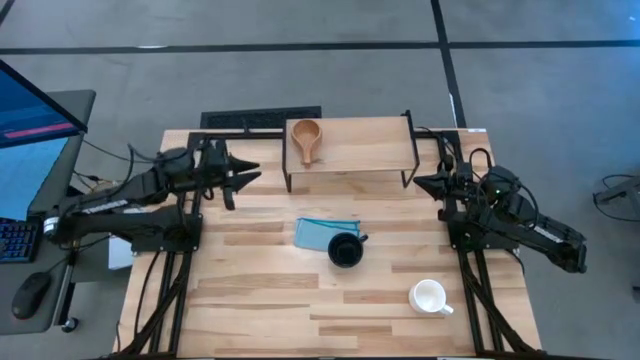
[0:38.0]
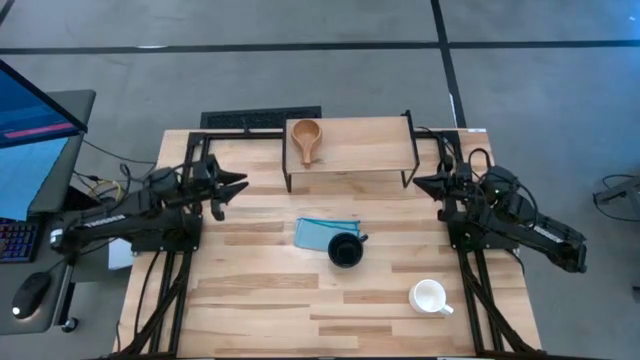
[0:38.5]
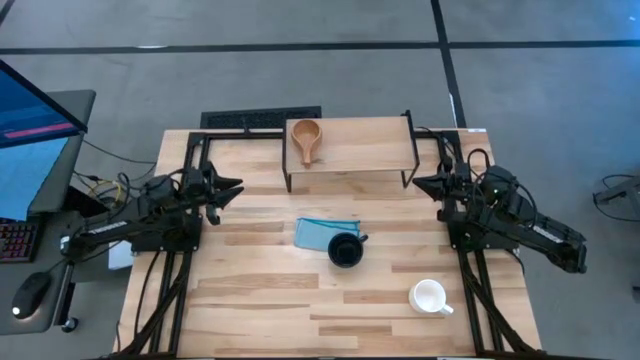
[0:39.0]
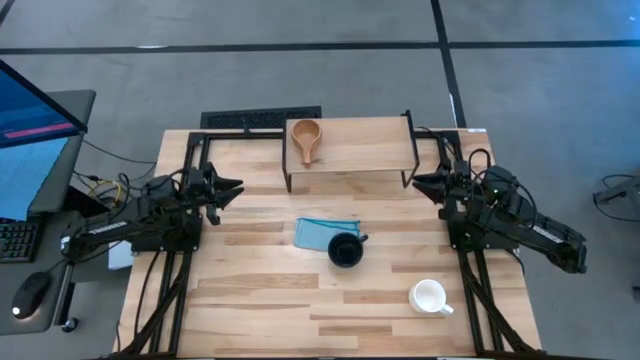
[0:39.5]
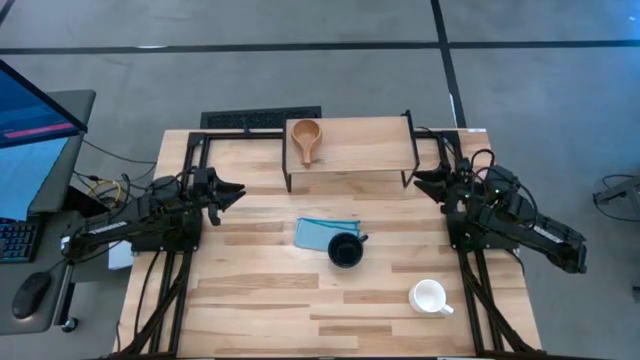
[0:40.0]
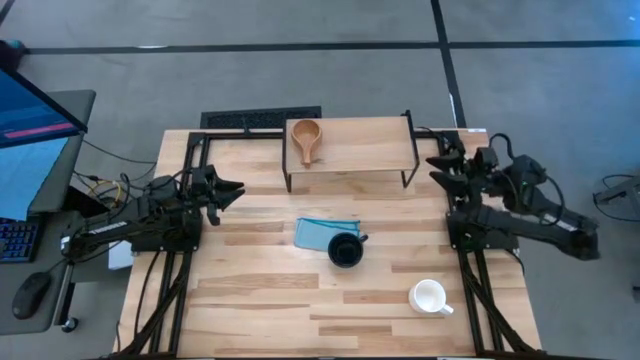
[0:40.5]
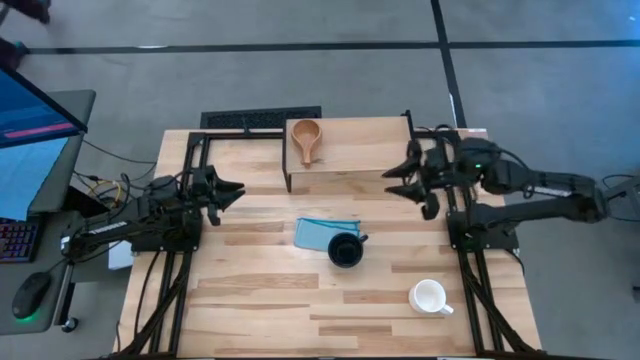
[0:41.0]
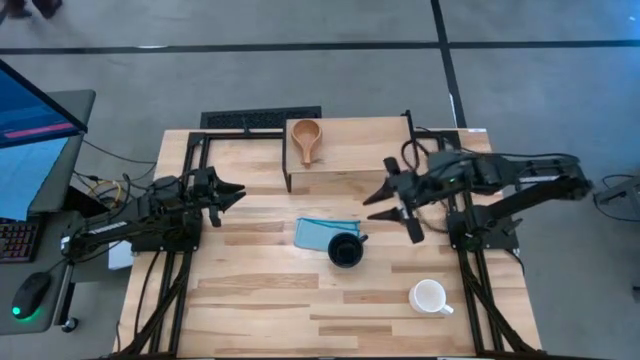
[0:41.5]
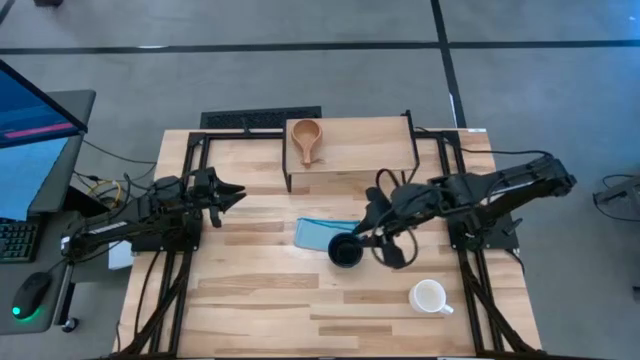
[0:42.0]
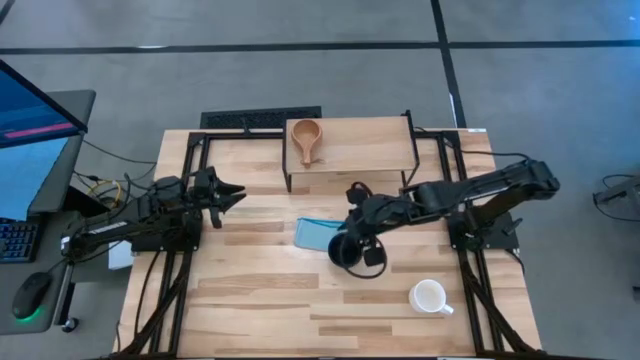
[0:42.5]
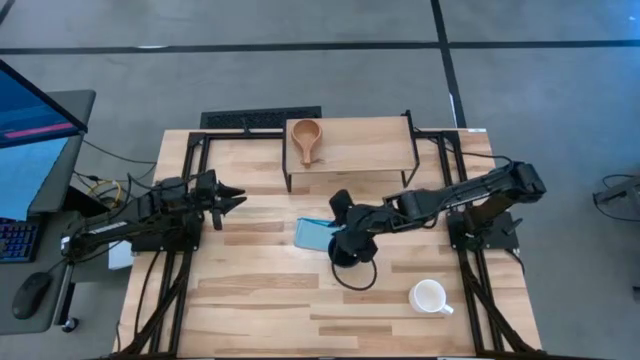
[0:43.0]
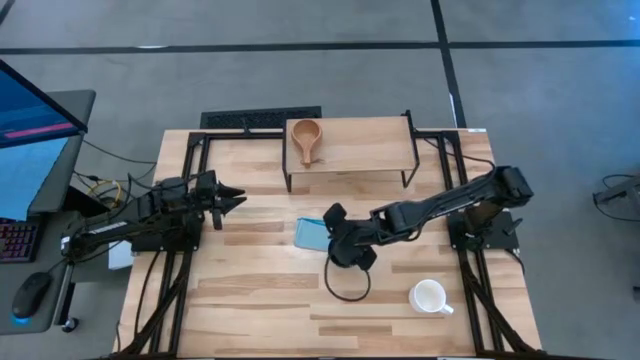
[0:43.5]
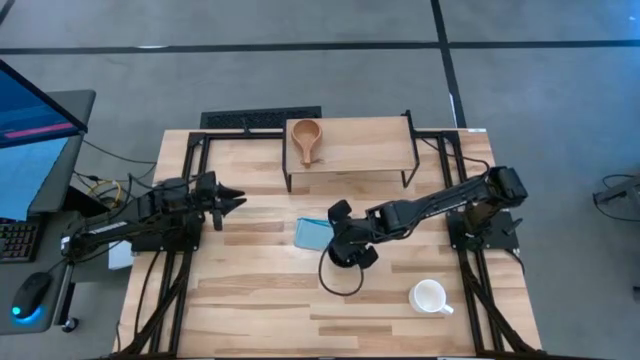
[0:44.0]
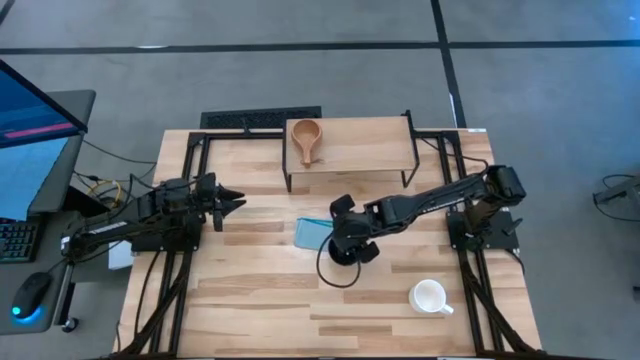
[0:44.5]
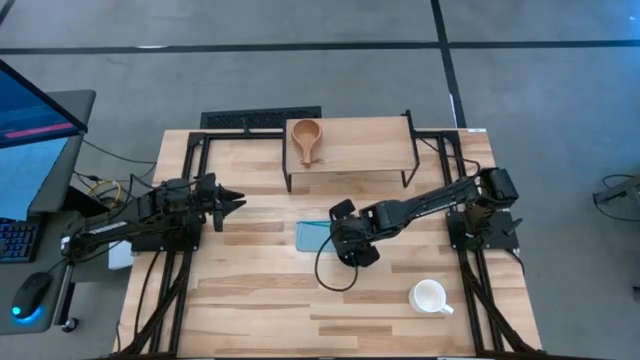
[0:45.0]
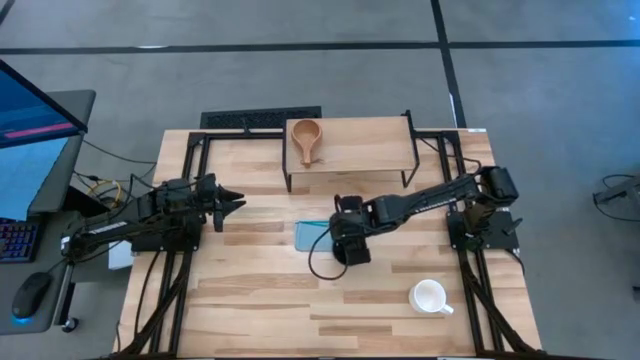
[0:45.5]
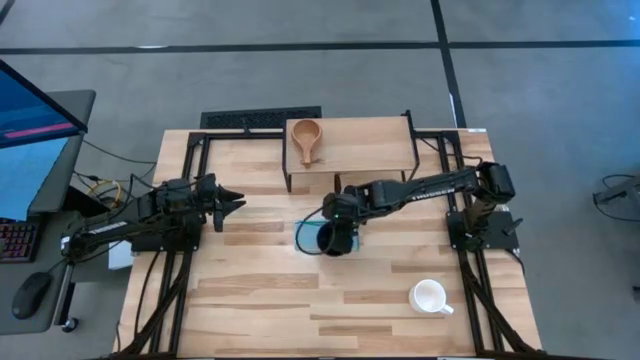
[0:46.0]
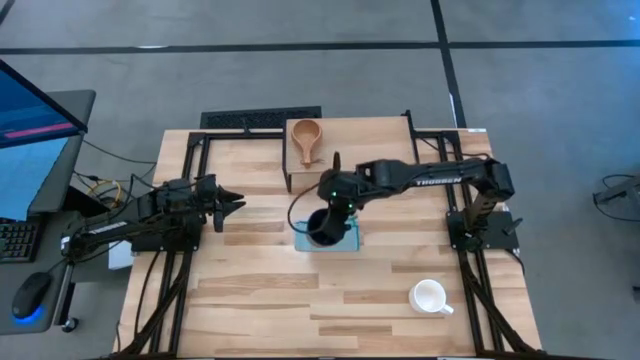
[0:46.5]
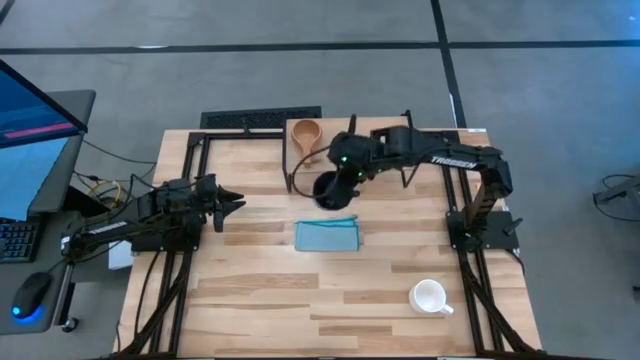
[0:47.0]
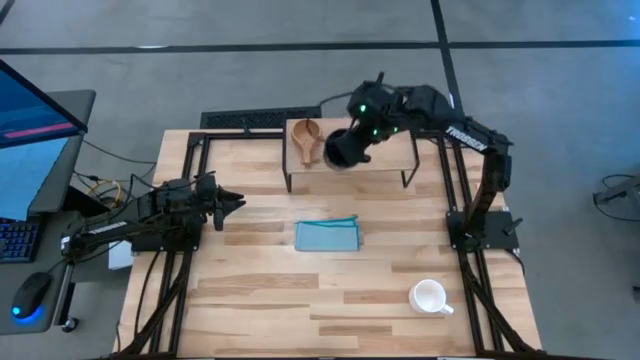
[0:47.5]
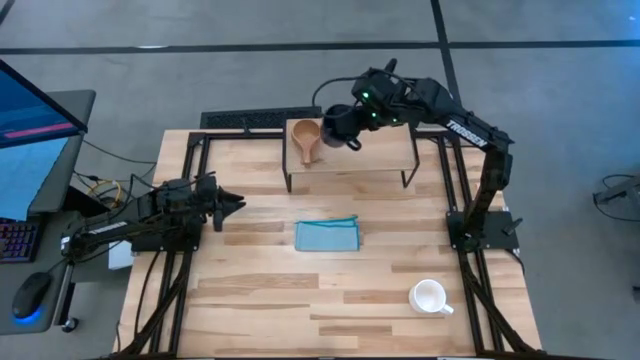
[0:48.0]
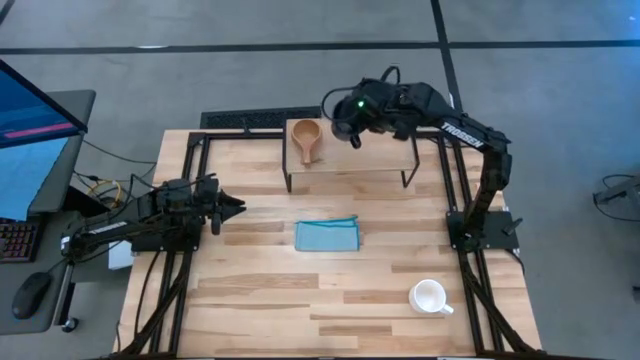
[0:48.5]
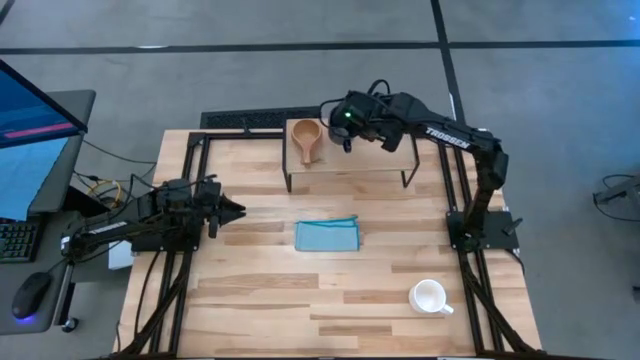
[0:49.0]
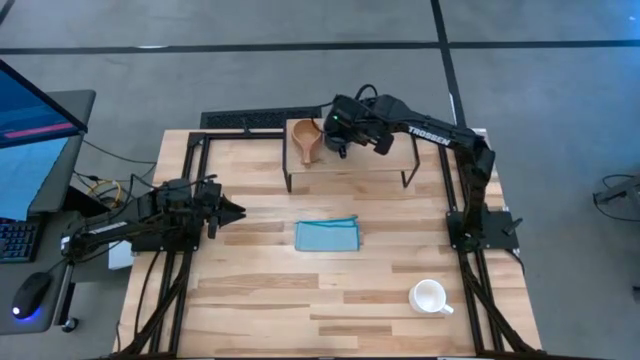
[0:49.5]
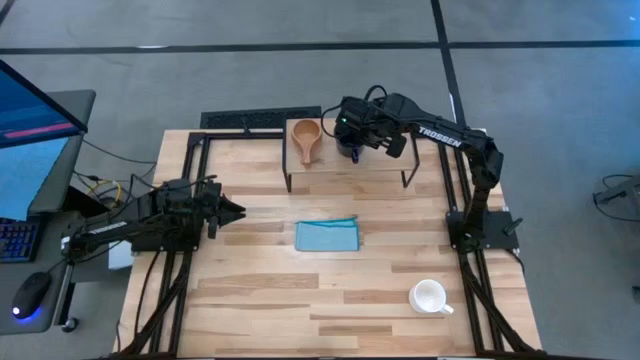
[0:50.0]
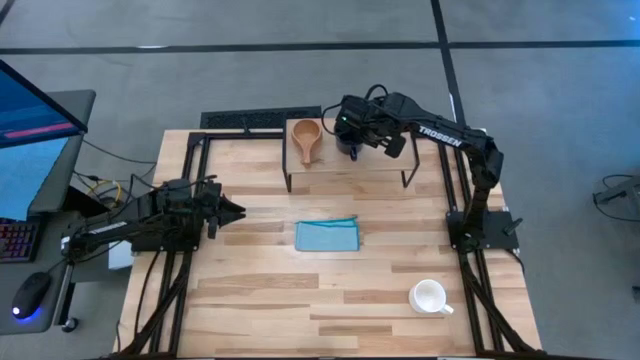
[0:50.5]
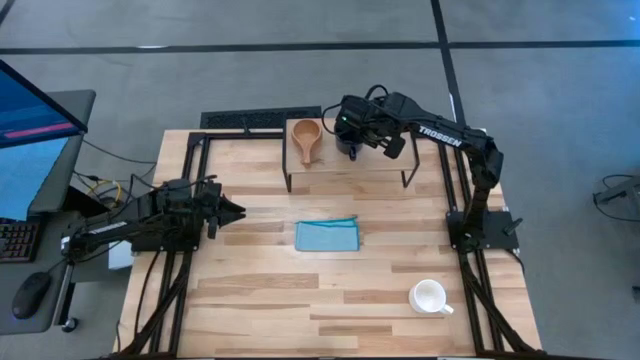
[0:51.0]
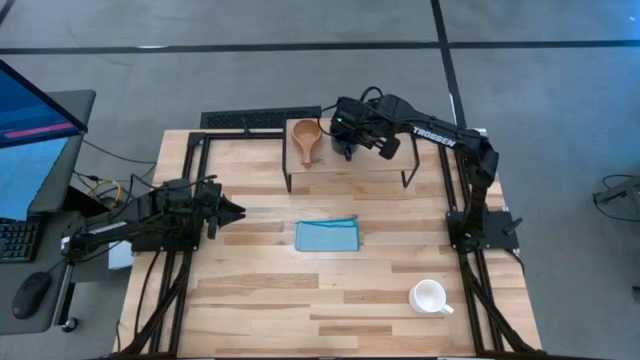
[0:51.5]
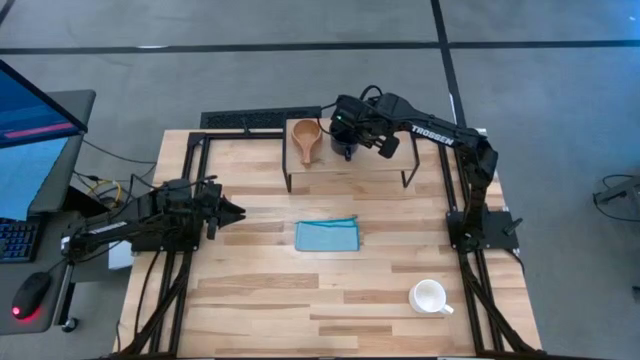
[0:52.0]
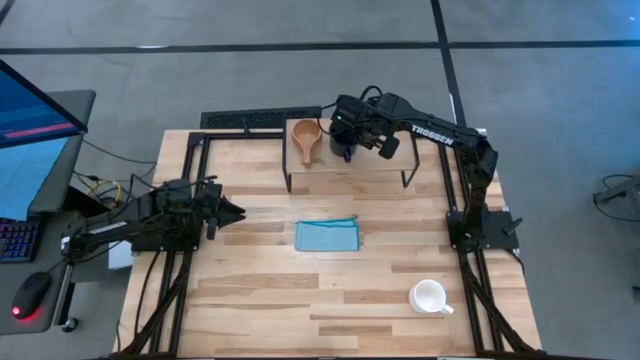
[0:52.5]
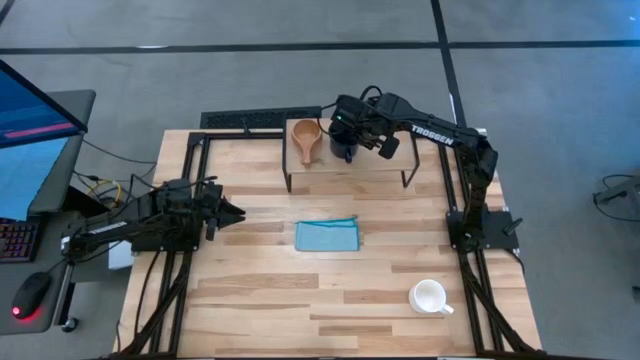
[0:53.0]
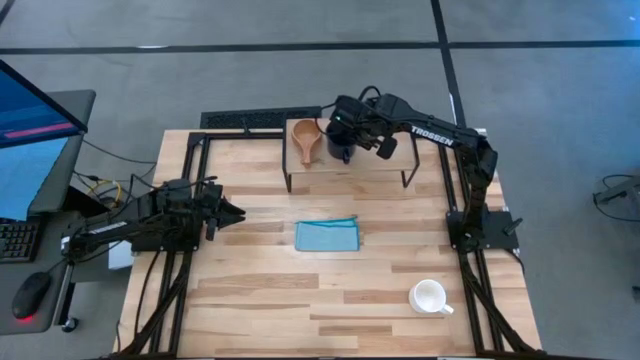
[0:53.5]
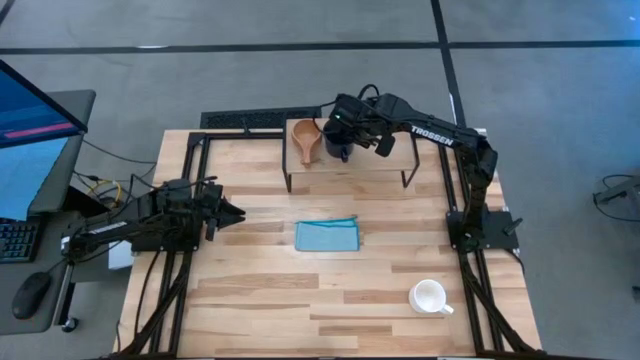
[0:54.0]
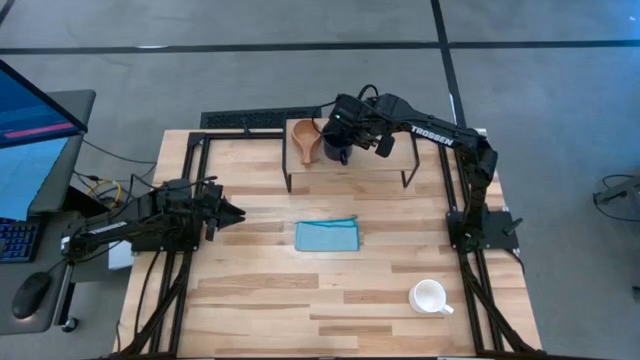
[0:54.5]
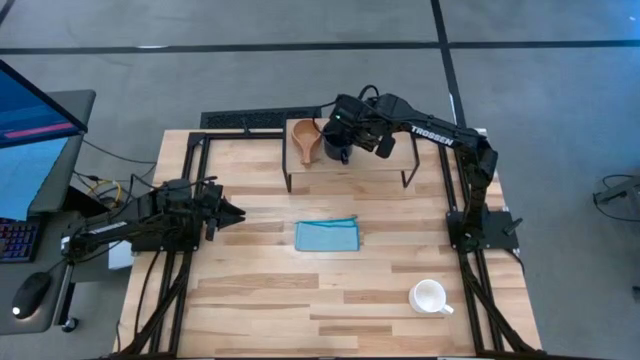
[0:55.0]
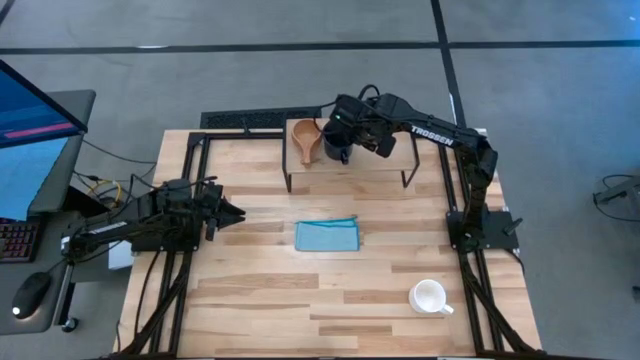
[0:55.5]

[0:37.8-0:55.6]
Task: Stack small to large cups/mugs on shelf
Put the dark blue mug on the shelf

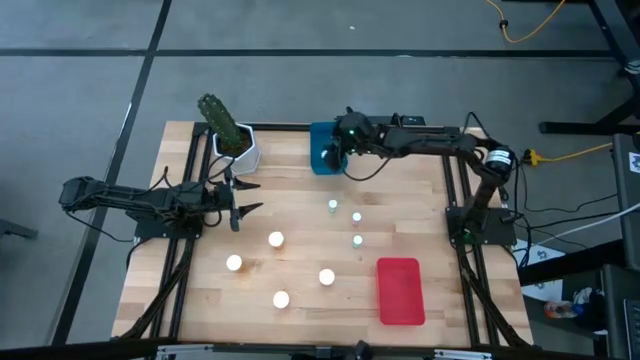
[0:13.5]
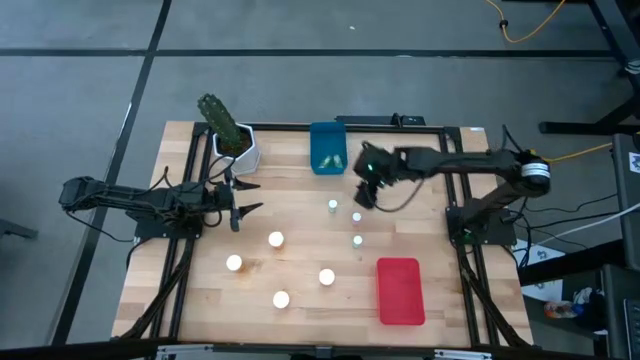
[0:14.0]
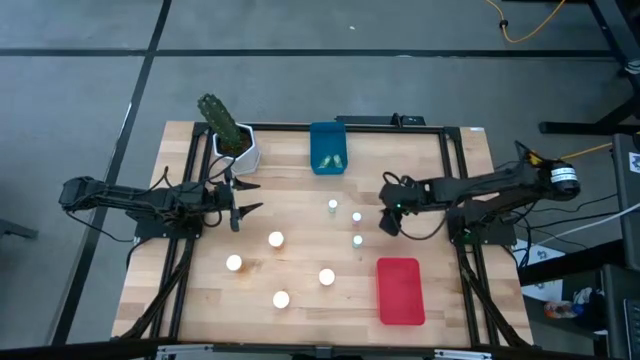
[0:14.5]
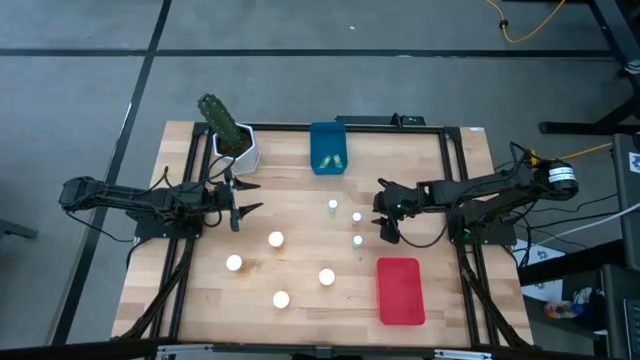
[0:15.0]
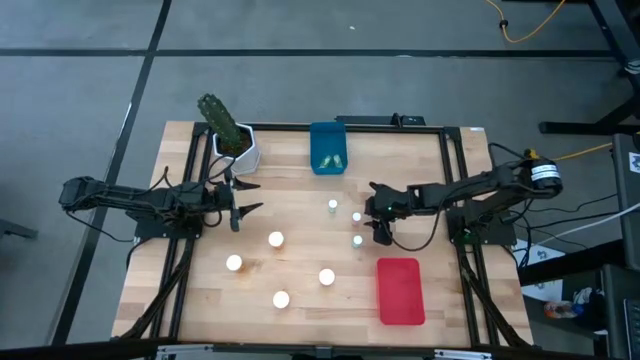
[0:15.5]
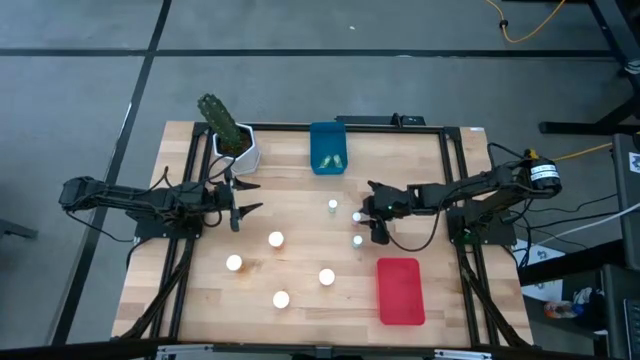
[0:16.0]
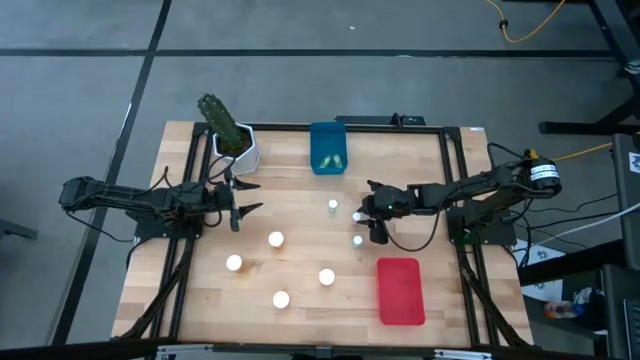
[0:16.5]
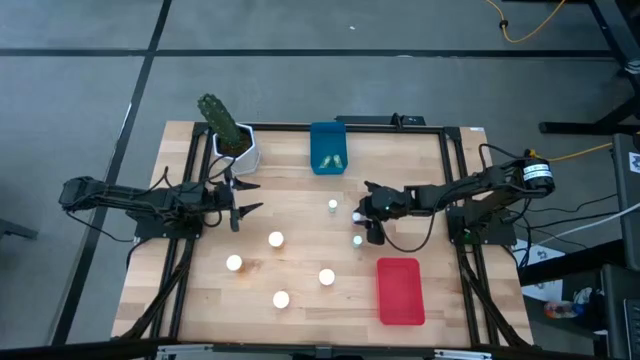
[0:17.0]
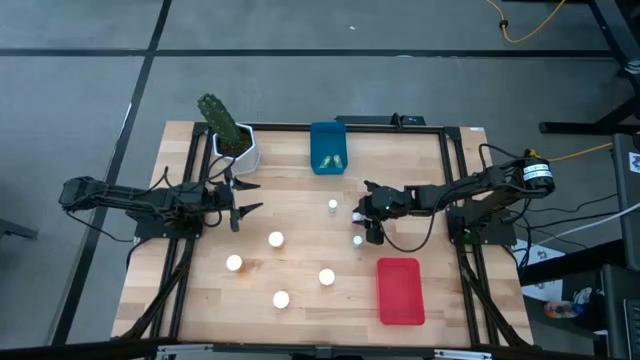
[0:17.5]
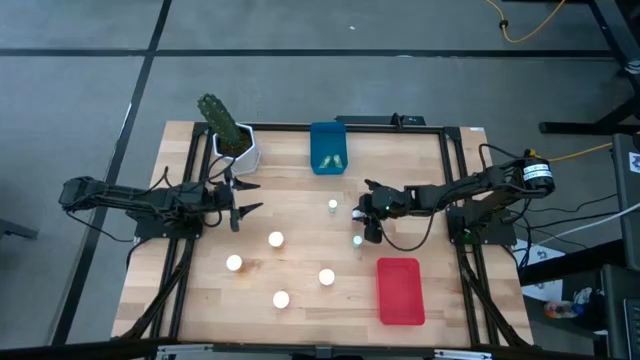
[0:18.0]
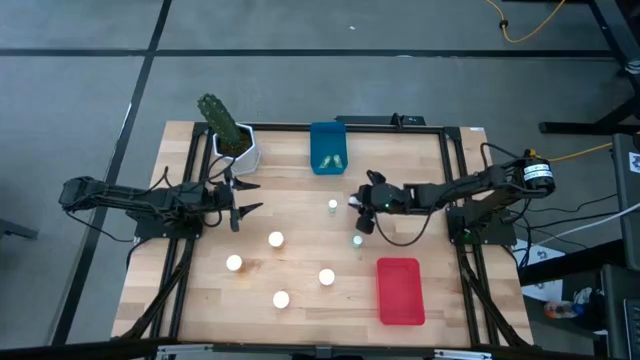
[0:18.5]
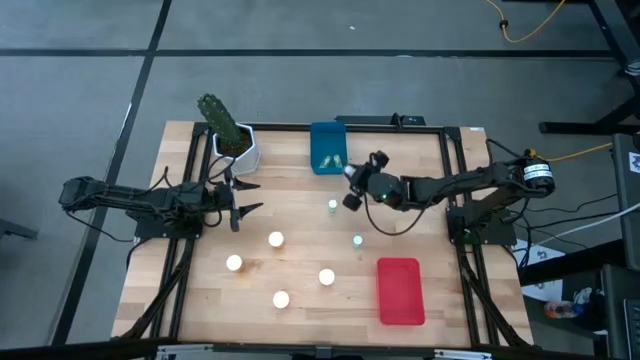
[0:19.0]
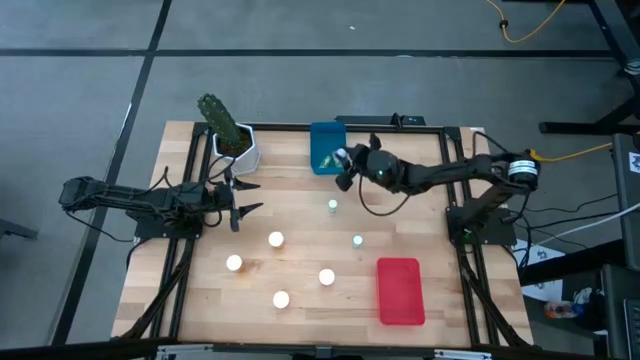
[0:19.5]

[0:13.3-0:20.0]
Task: Pick and place medicine bottles into bin by pill shape (circle, oval)
Put the small pink pill bottle into the blue bin
